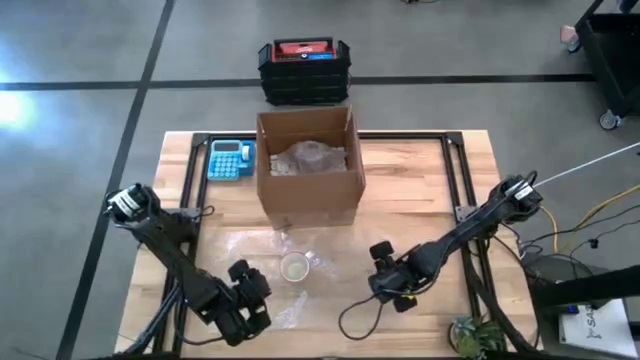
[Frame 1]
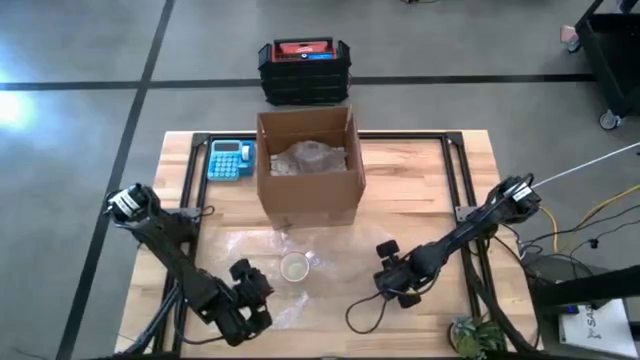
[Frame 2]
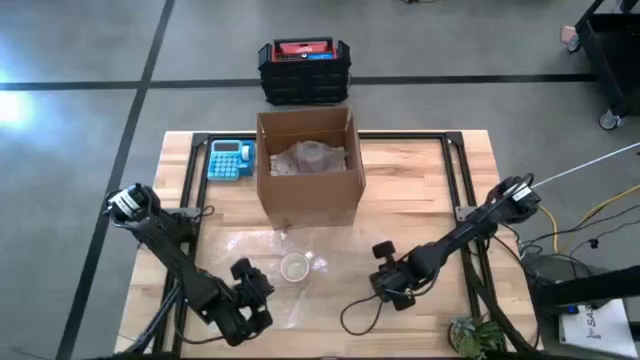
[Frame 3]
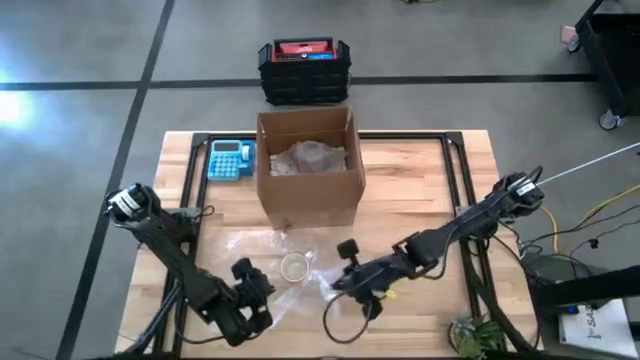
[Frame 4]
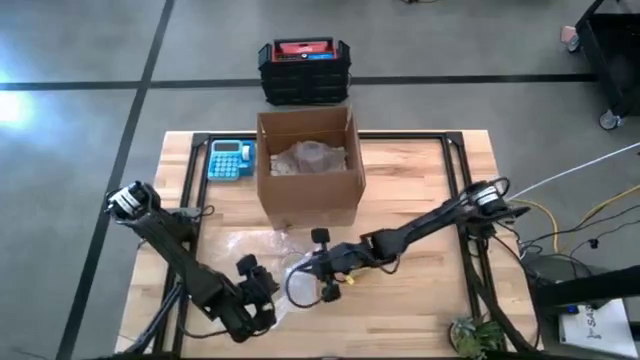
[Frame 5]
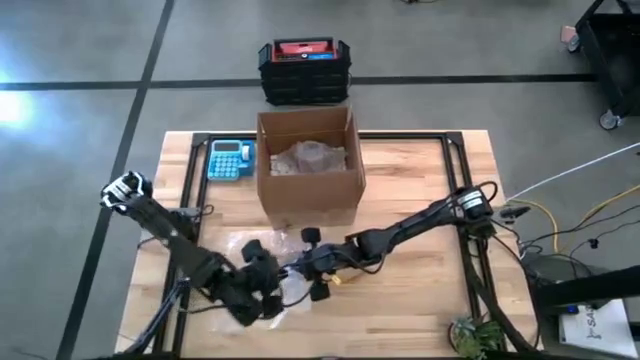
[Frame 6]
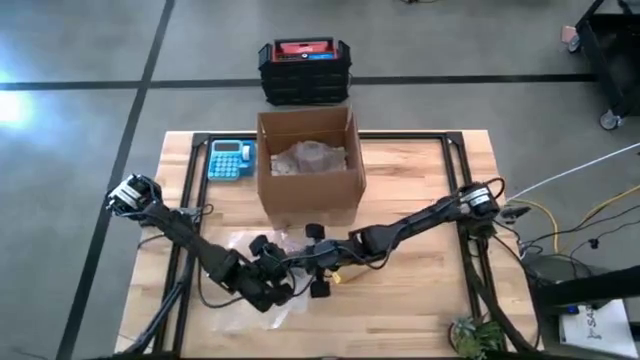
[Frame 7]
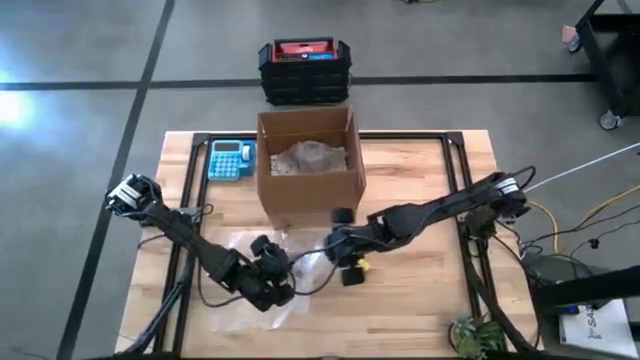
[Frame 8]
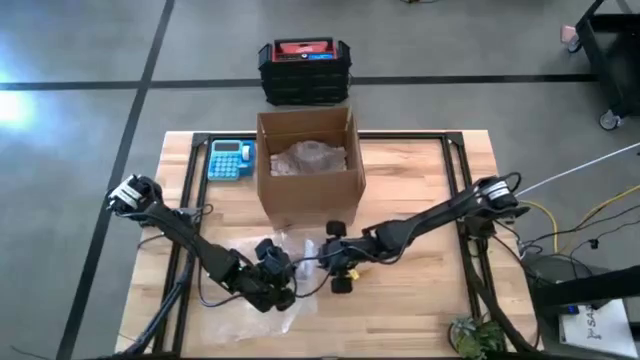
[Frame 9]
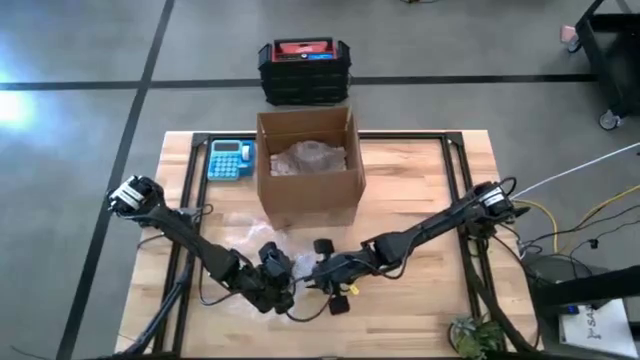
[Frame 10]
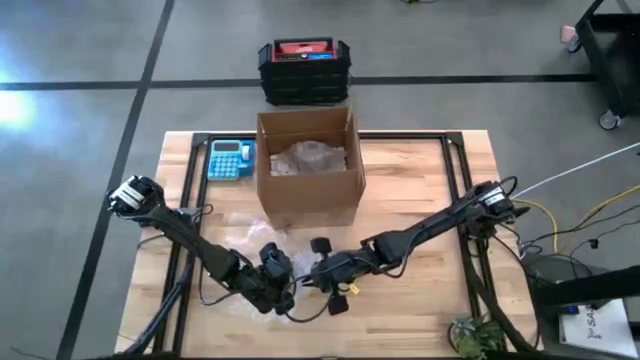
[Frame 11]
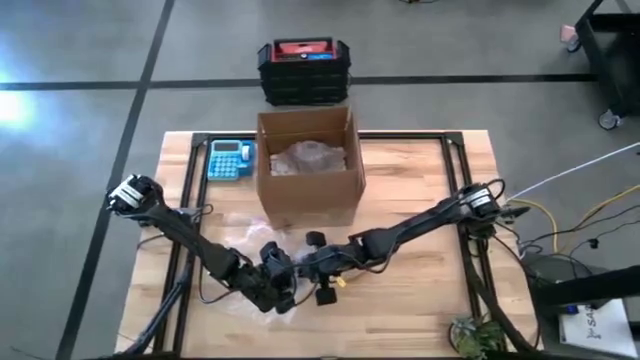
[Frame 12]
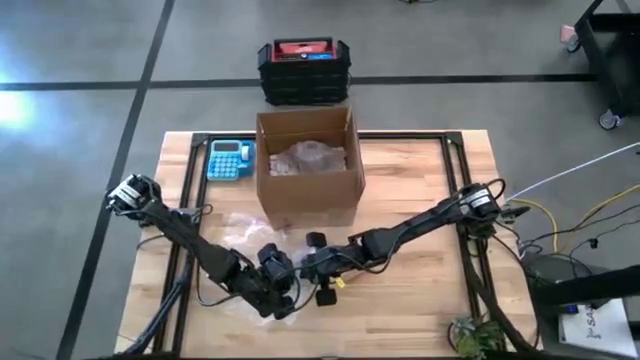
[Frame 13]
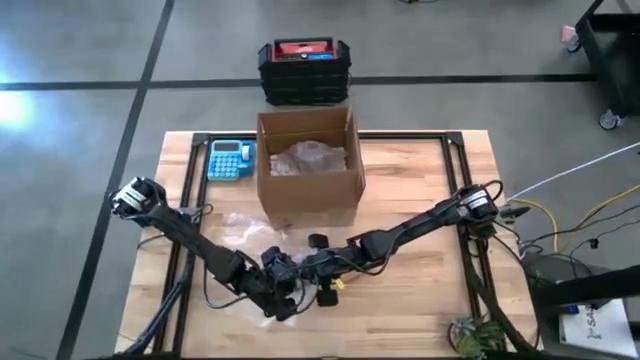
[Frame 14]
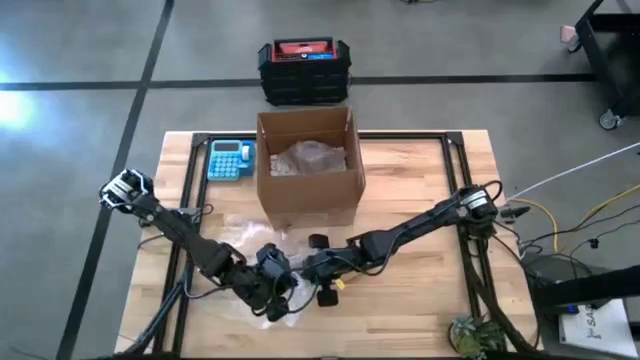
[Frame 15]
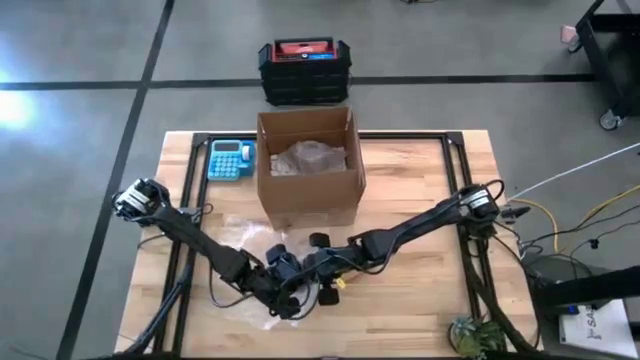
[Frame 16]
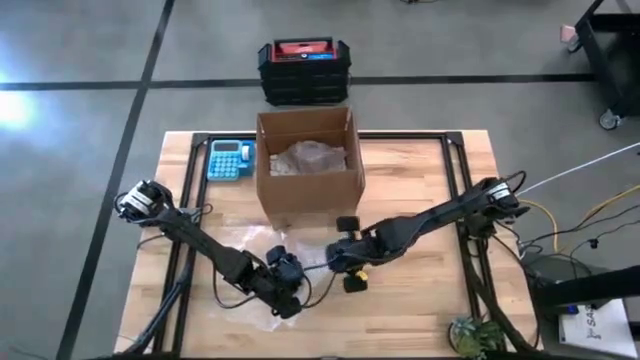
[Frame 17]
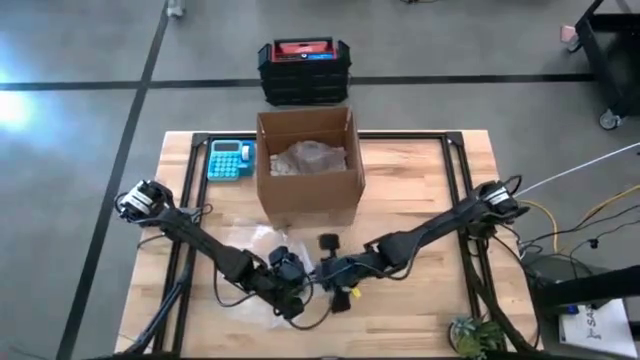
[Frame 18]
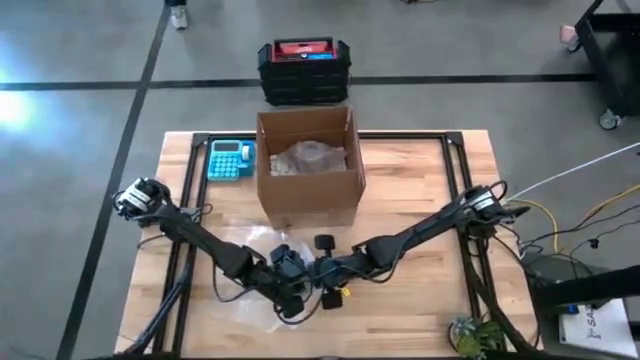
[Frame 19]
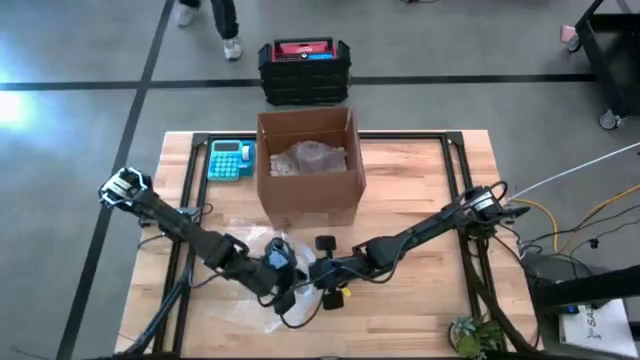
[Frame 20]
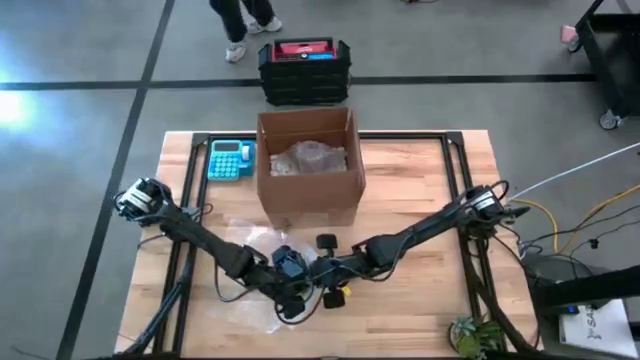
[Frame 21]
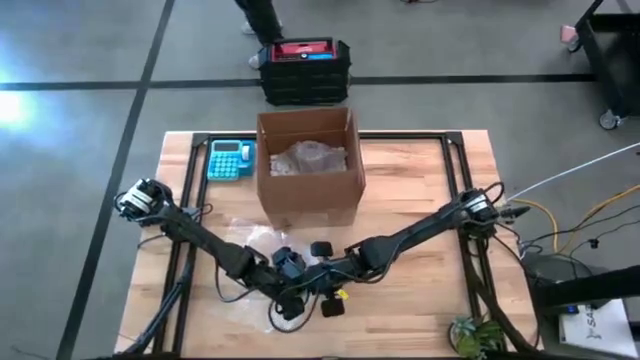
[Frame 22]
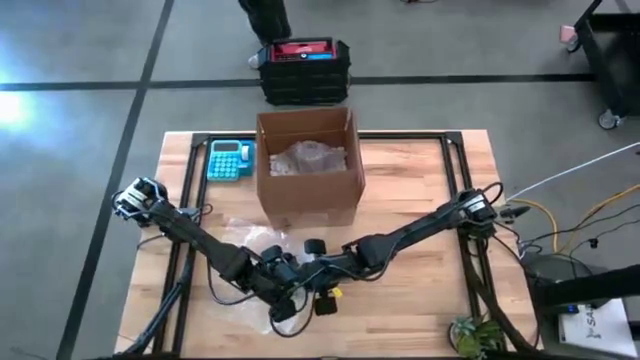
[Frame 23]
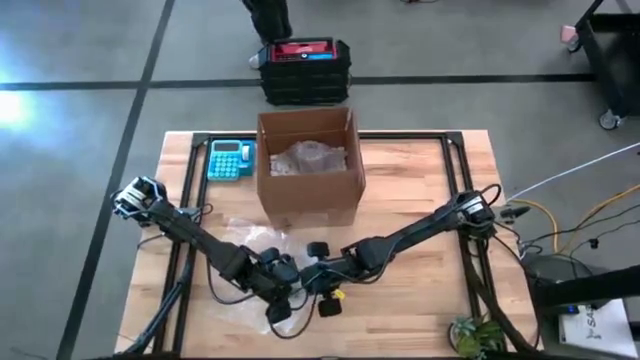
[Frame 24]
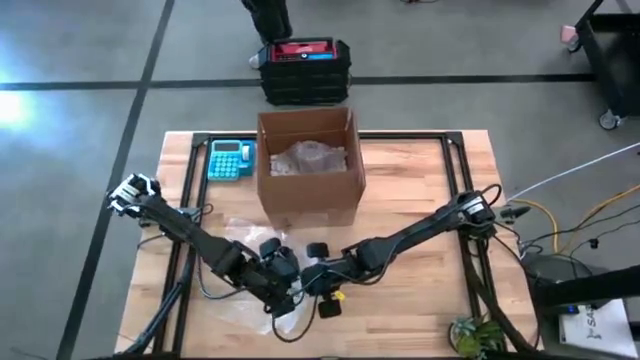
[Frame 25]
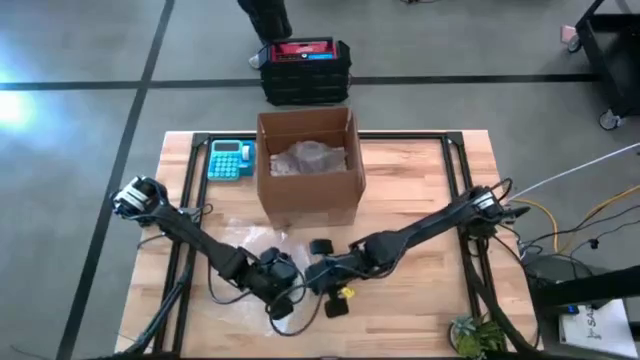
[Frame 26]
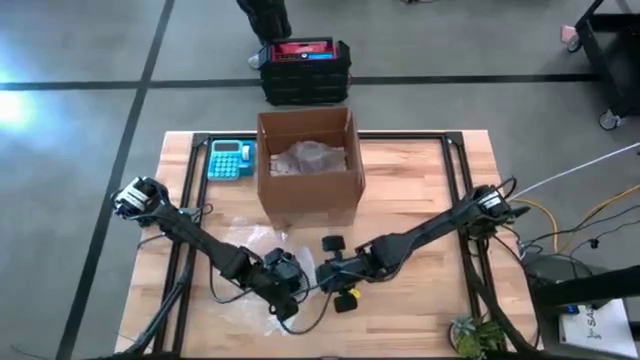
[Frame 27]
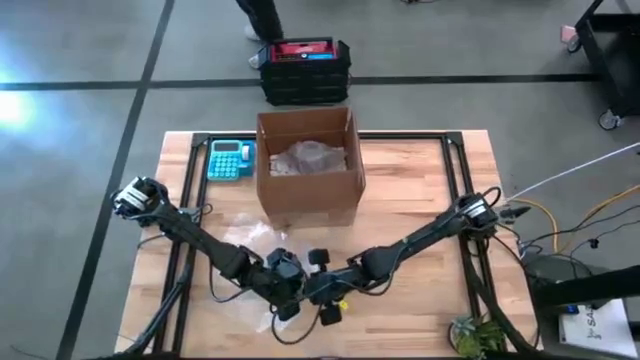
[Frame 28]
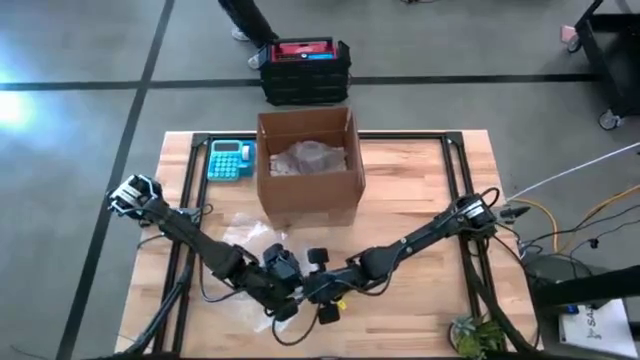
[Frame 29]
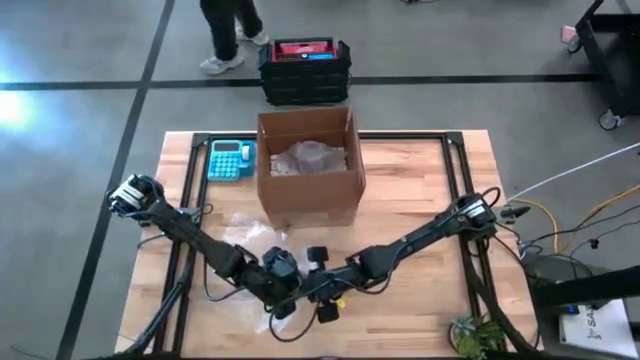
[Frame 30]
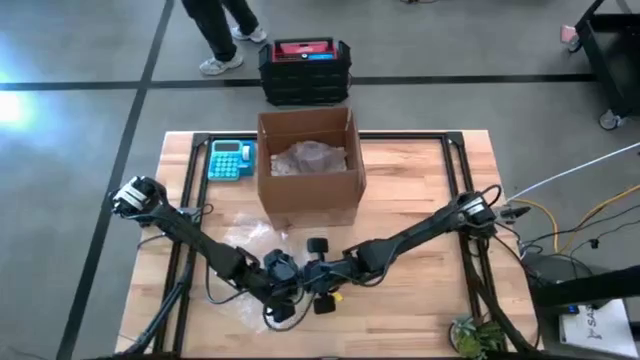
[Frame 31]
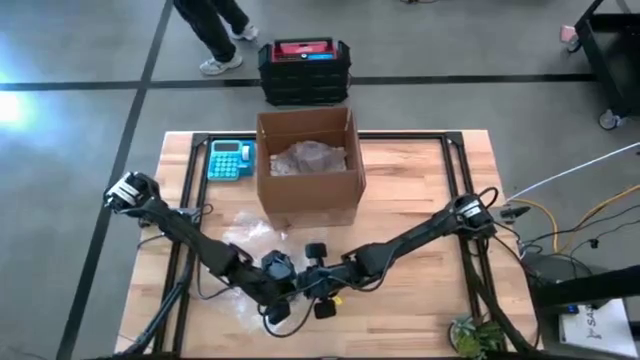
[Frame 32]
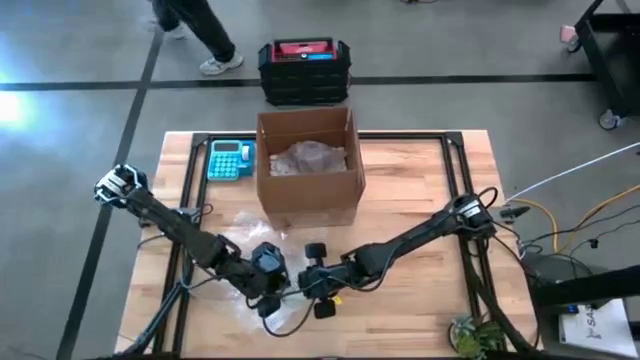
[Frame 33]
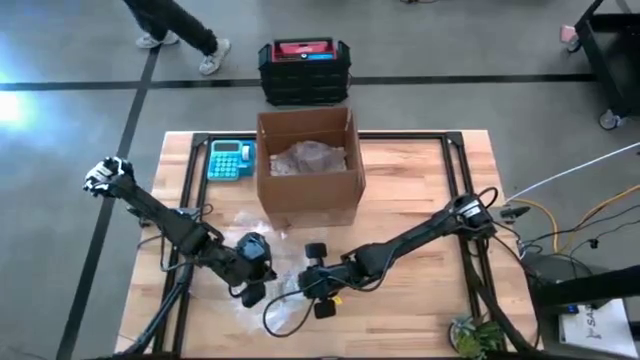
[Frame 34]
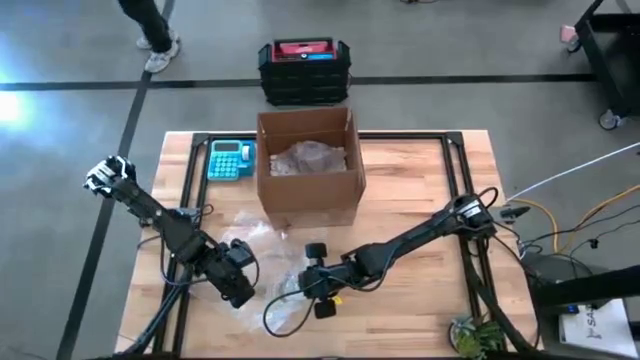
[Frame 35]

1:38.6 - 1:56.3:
Task: wrap mug
Wrap the gray mug with transparent bubble wrap

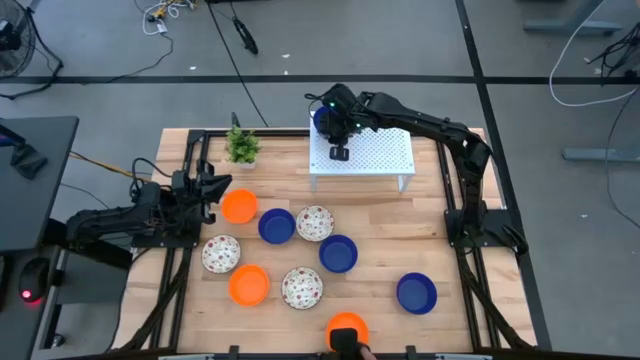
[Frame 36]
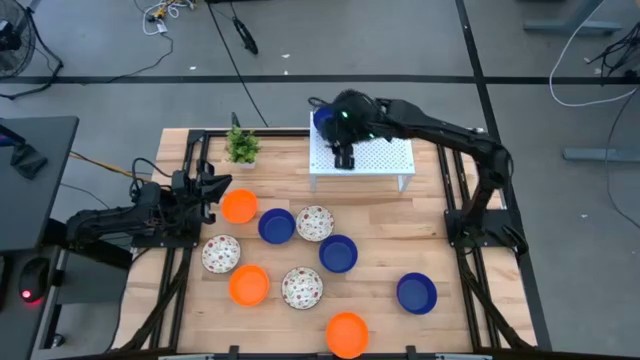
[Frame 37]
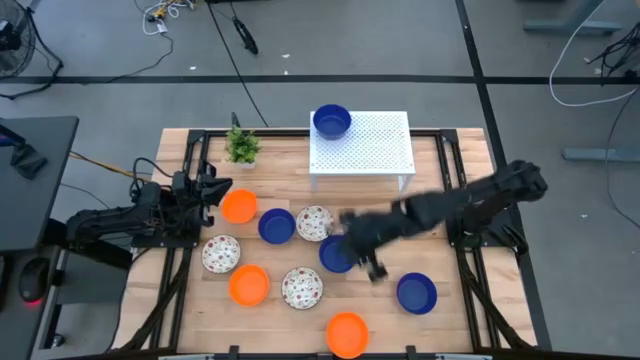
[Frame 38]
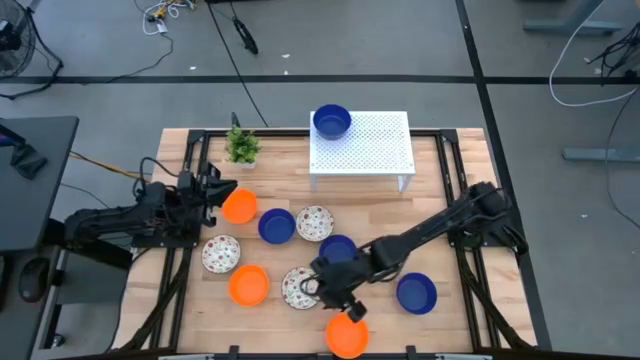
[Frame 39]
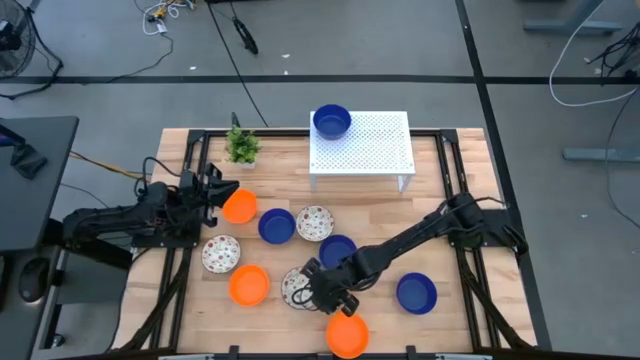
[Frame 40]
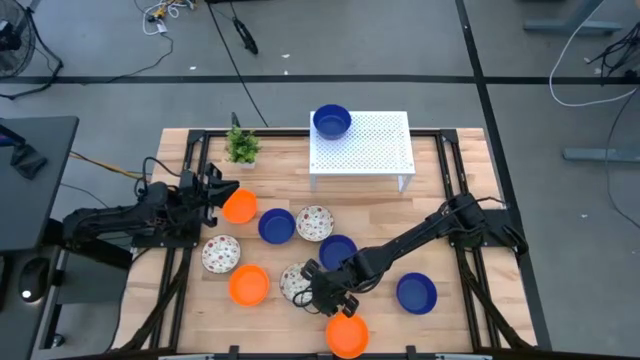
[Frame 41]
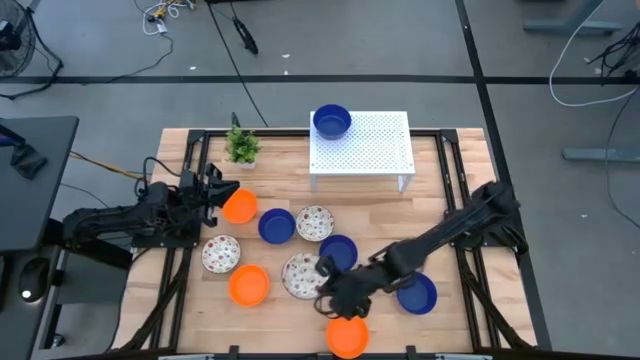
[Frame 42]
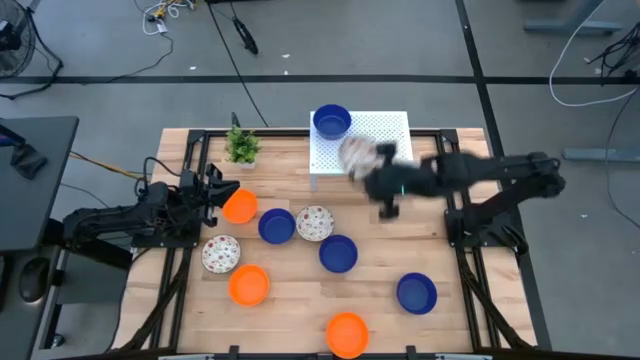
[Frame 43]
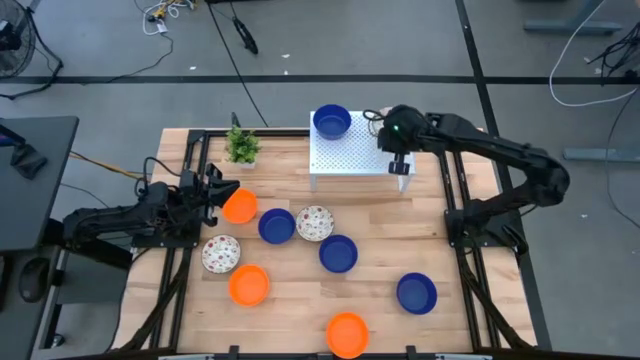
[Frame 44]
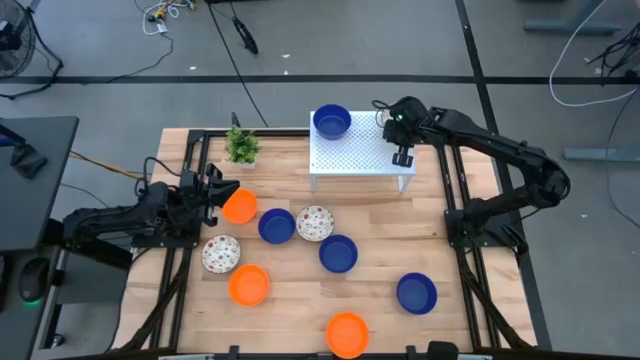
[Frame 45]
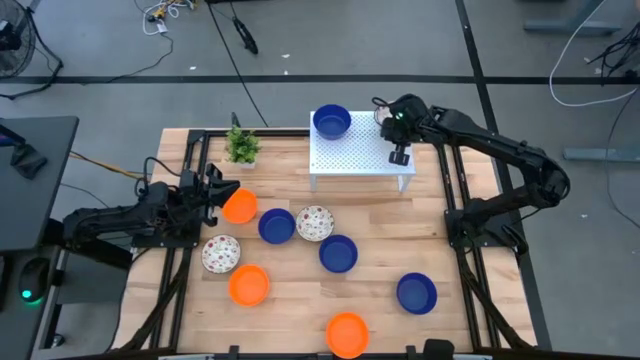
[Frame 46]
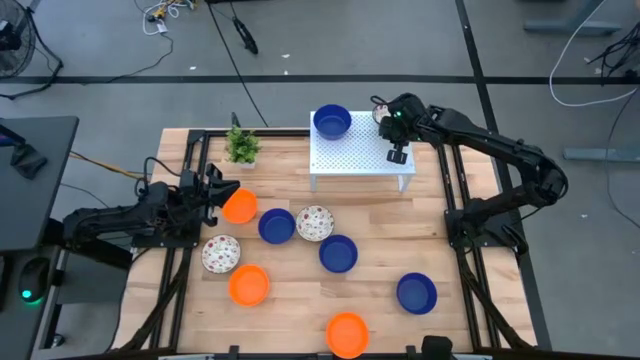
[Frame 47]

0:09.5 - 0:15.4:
Task: Pick & Place Mini bowls
Put the white red patterned bowl on the shelf
